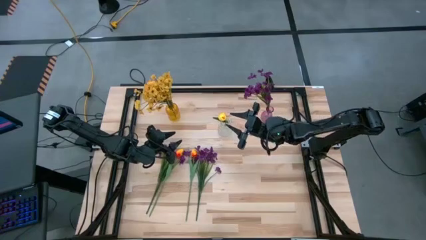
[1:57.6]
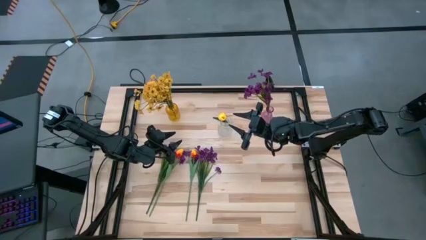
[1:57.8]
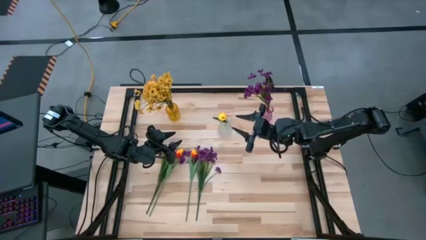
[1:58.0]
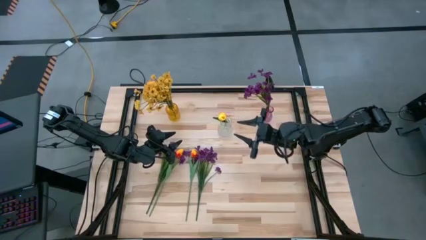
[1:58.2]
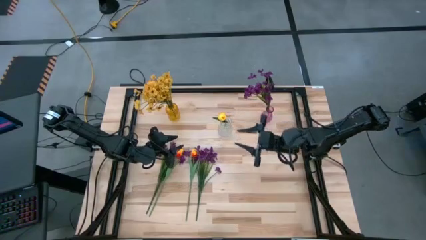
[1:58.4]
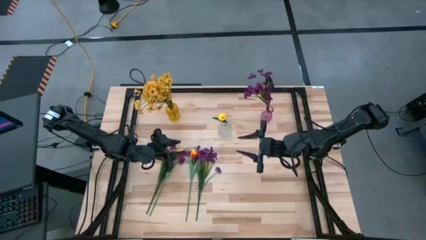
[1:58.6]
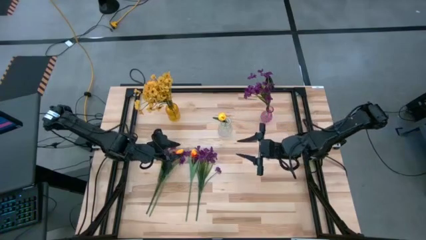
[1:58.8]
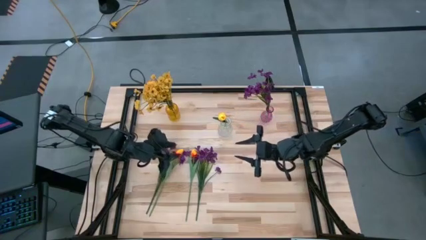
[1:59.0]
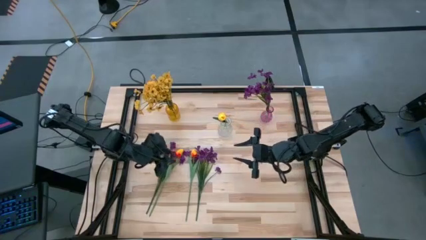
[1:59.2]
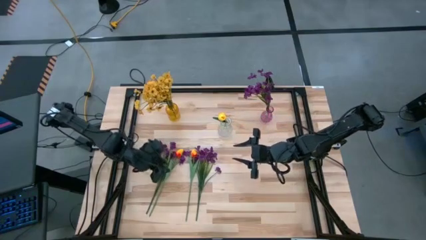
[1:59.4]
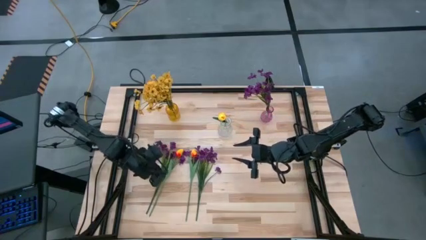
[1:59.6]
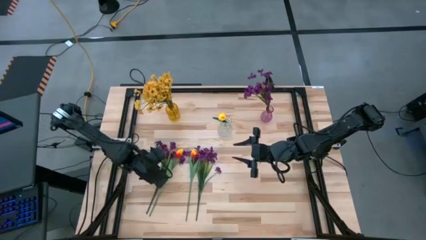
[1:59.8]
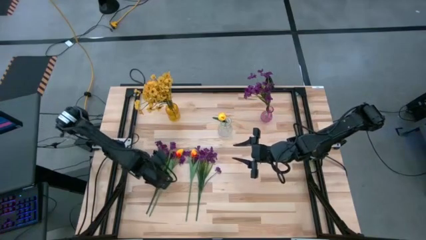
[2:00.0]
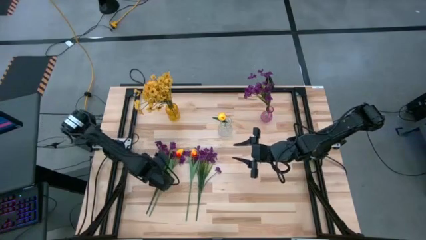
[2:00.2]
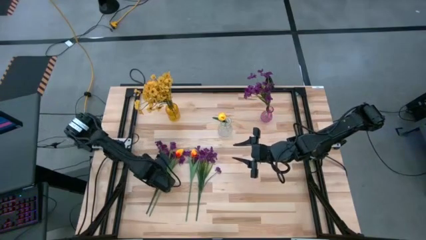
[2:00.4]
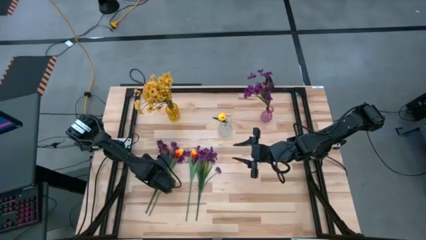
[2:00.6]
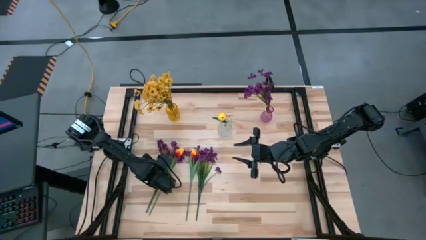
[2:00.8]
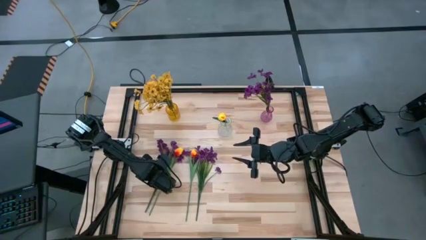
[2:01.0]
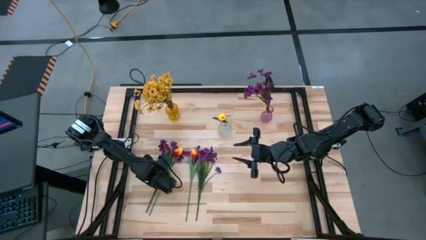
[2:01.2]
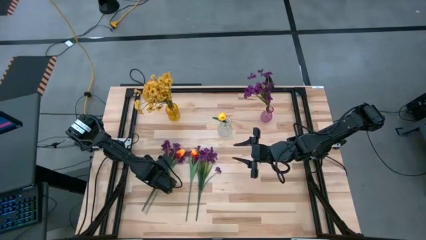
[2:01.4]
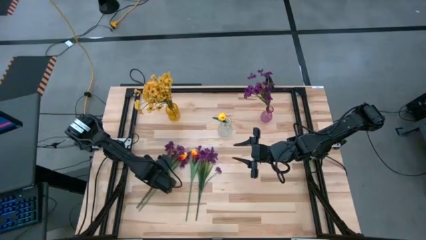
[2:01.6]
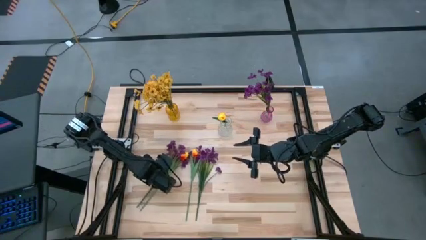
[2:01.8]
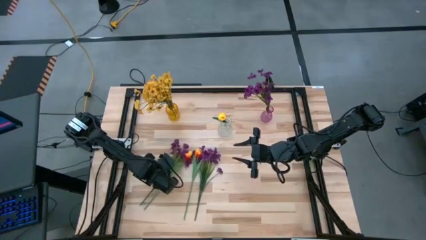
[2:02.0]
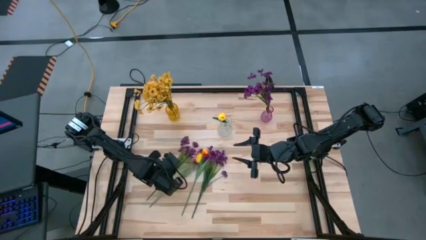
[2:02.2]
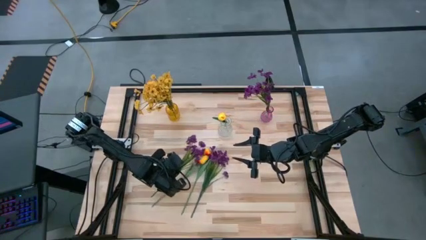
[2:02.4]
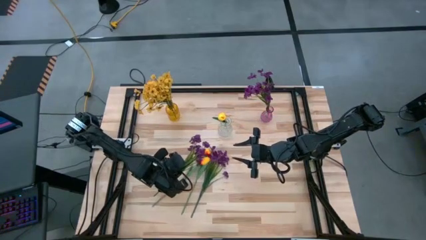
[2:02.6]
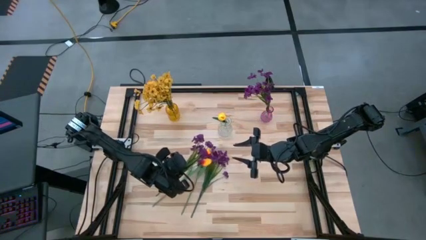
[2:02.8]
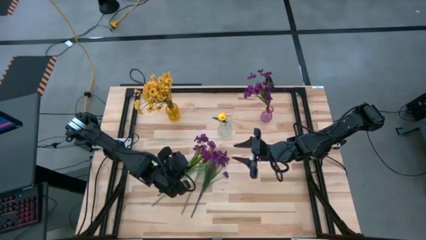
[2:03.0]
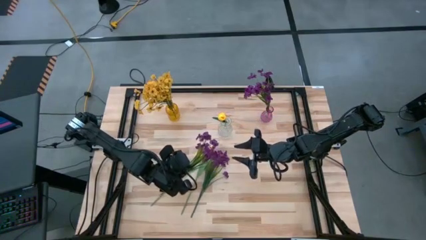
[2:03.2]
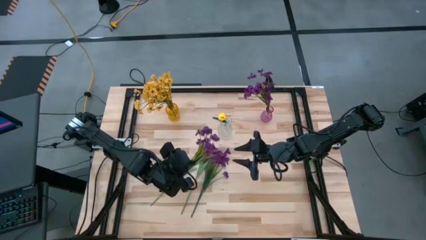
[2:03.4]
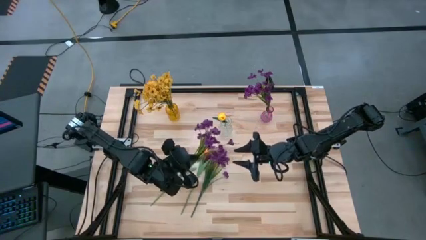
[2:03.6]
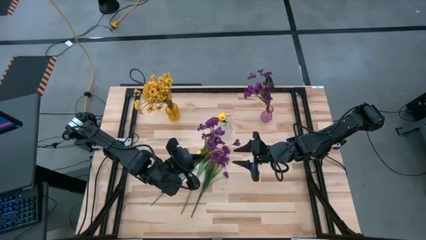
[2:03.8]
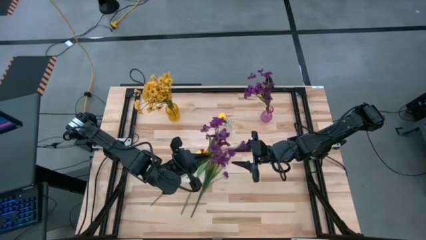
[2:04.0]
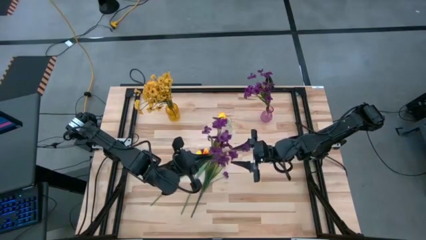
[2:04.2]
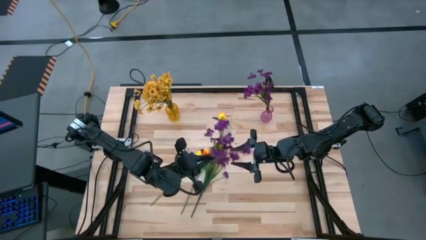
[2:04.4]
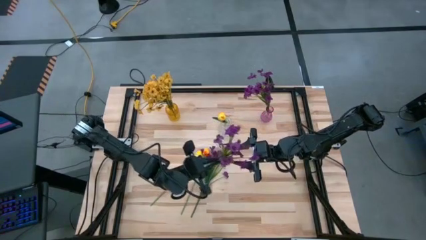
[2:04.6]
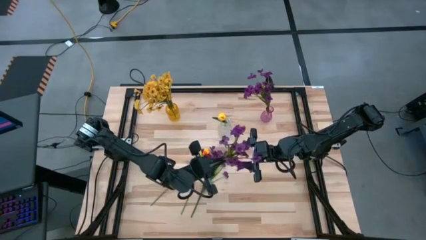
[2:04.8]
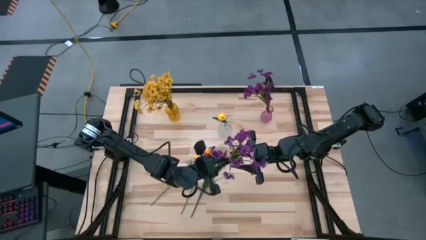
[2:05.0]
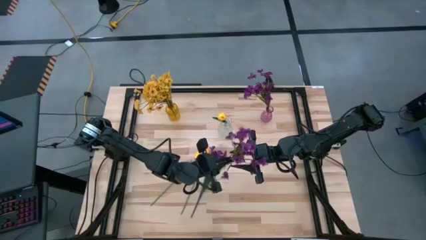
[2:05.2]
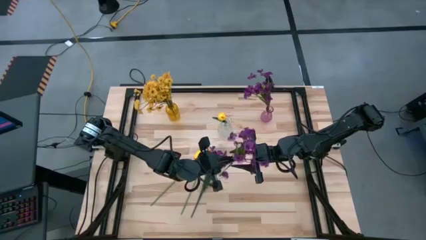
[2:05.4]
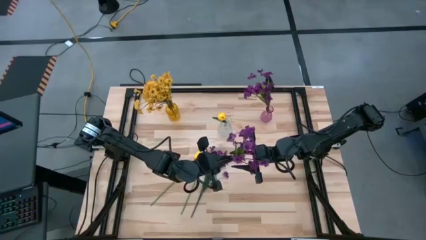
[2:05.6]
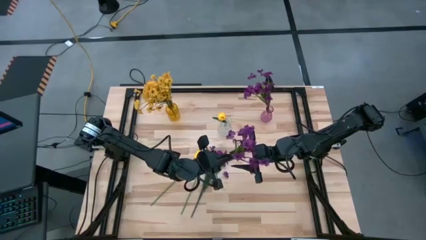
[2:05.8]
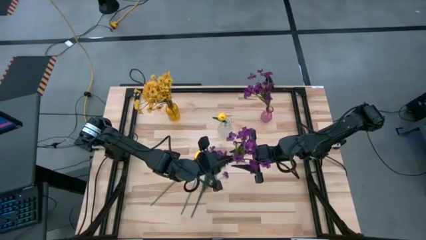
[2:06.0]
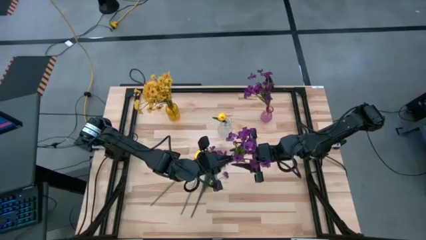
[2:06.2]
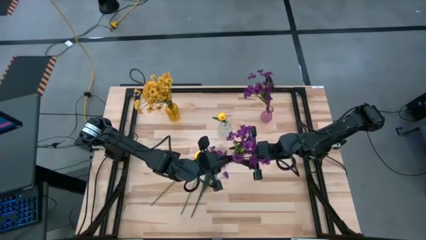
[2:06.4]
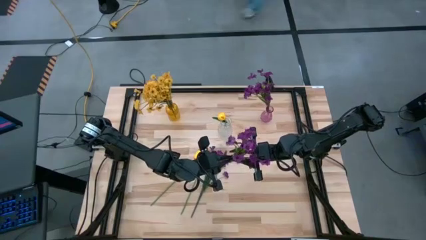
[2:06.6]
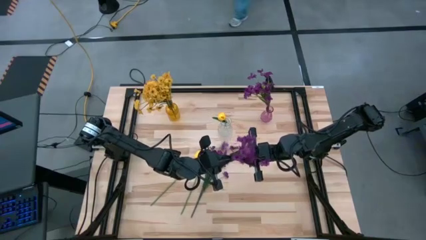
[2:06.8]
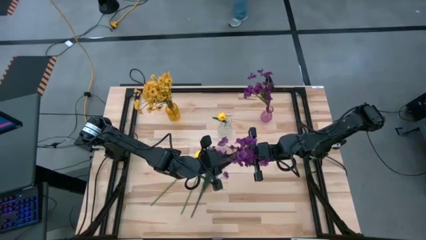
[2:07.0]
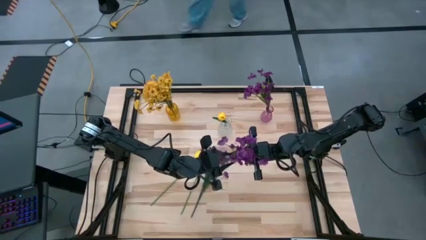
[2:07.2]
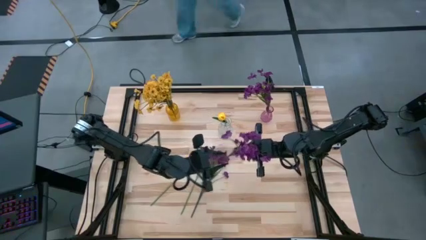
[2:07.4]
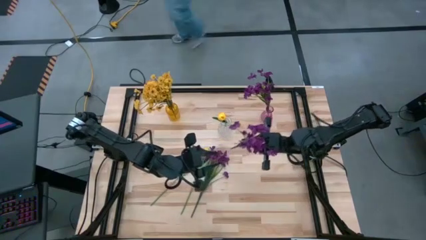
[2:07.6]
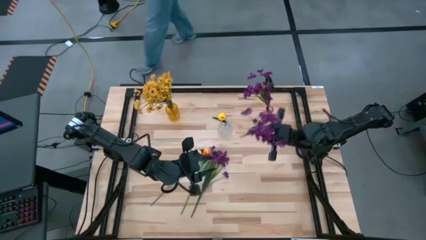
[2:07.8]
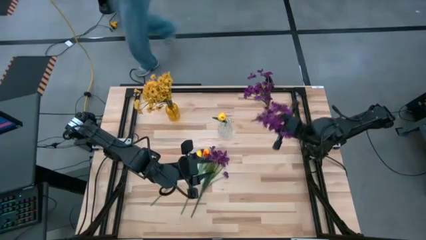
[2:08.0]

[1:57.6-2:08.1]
Task: Sort flowers into vase by color
Put the violet flowers into the pink vase
